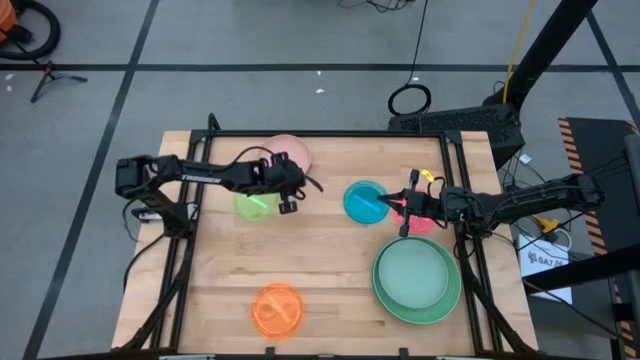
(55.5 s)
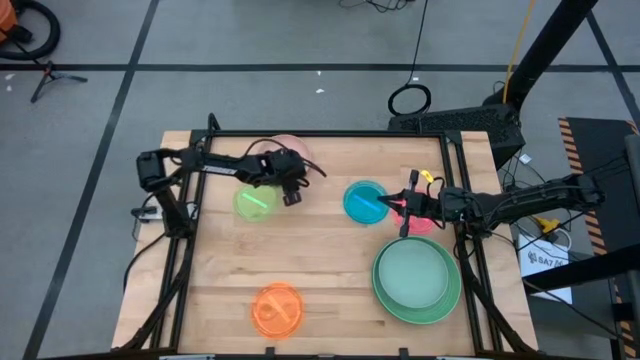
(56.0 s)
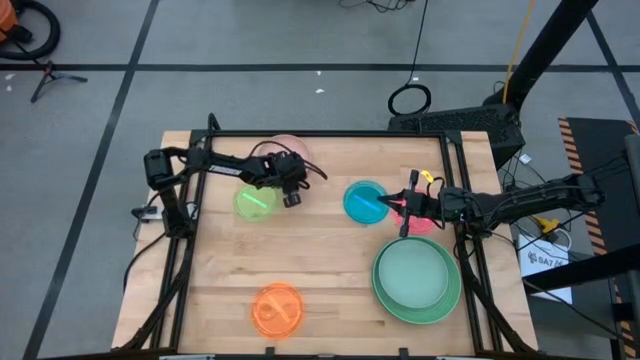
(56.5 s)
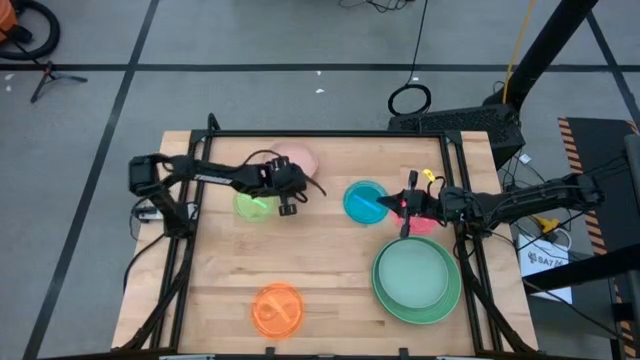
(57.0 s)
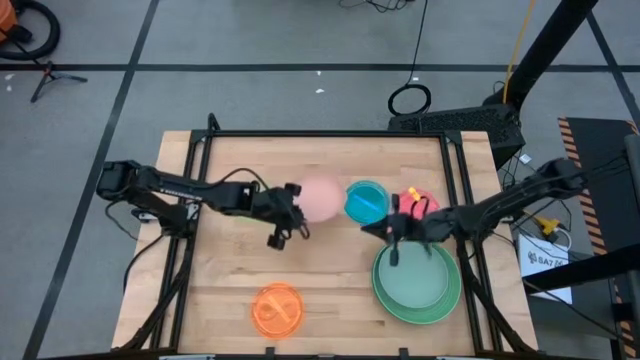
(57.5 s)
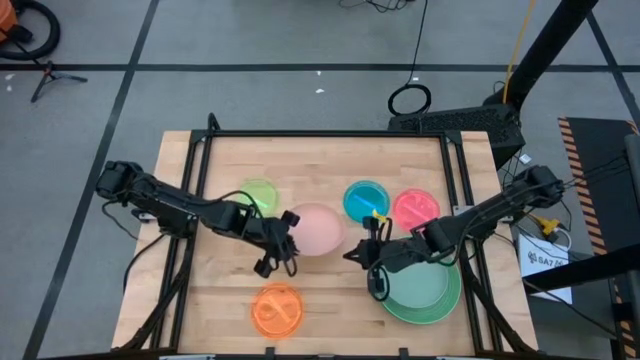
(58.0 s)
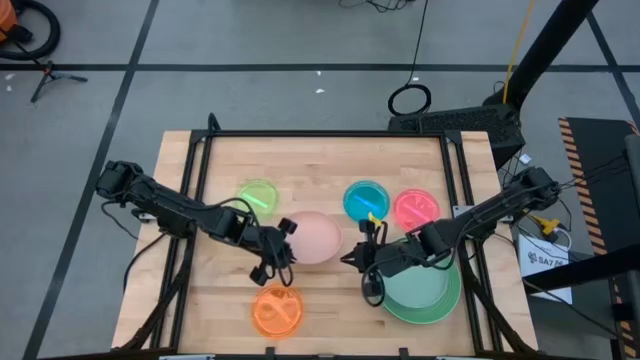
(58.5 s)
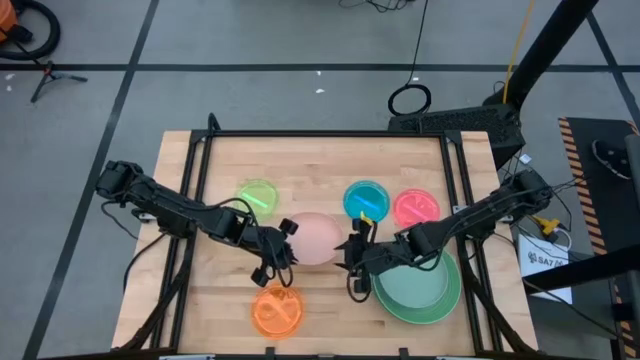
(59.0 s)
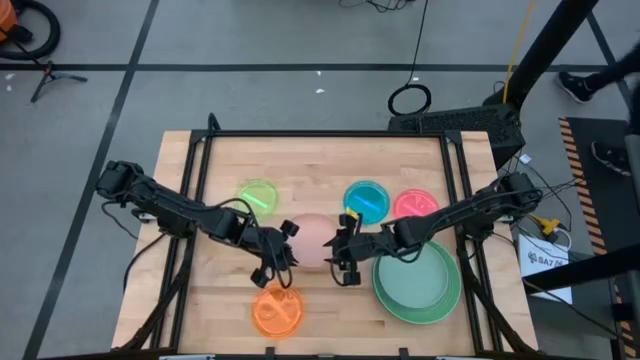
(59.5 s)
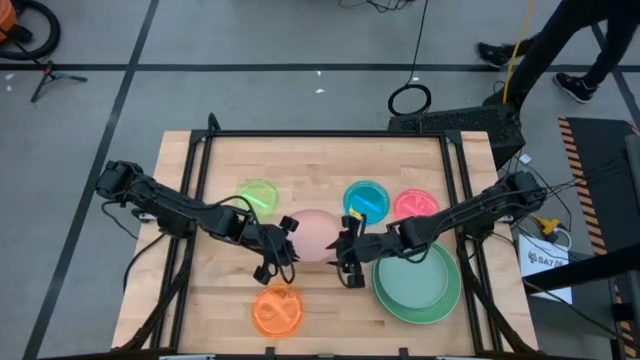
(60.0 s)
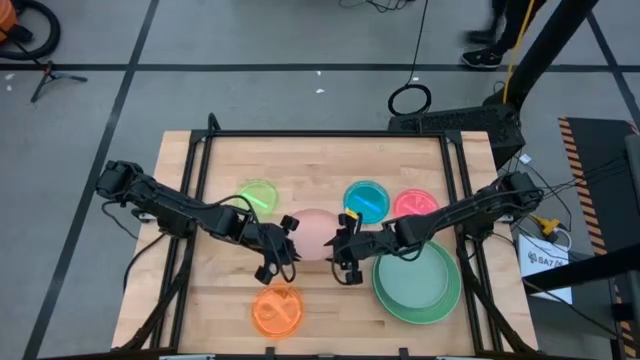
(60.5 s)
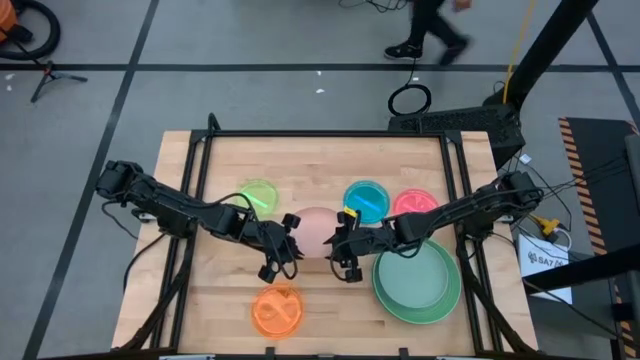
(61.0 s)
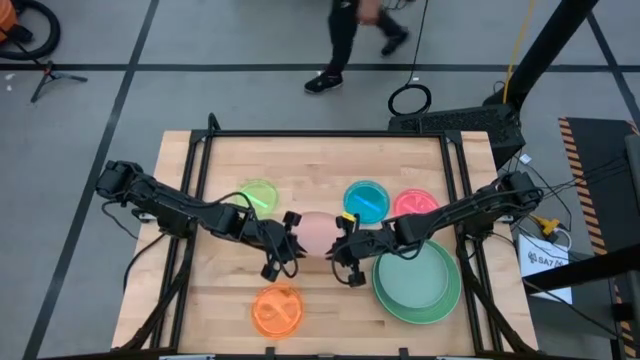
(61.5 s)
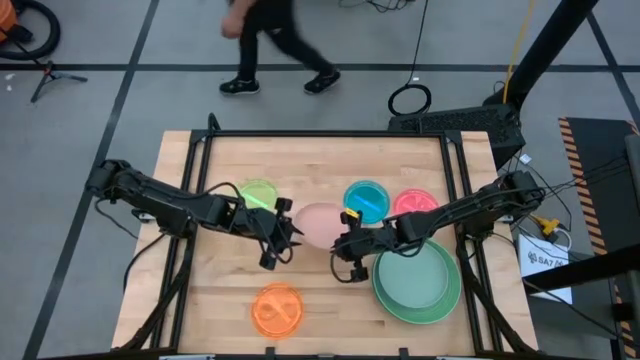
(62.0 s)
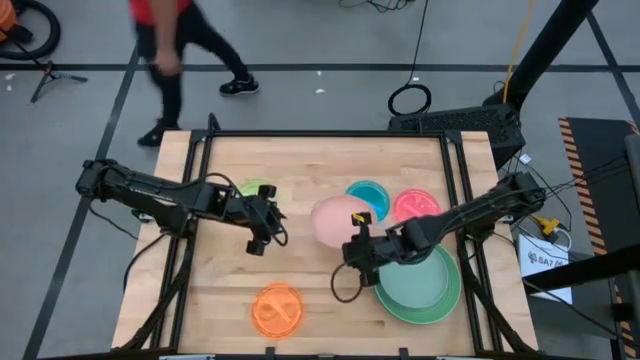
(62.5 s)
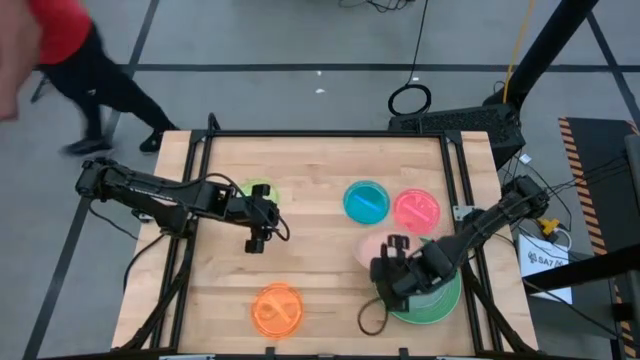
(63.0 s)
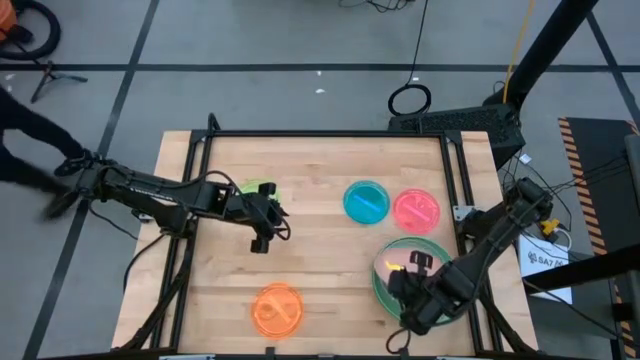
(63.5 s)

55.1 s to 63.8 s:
Task: Stack plastic plates
Stack the light pink plate on top of the light blue plate

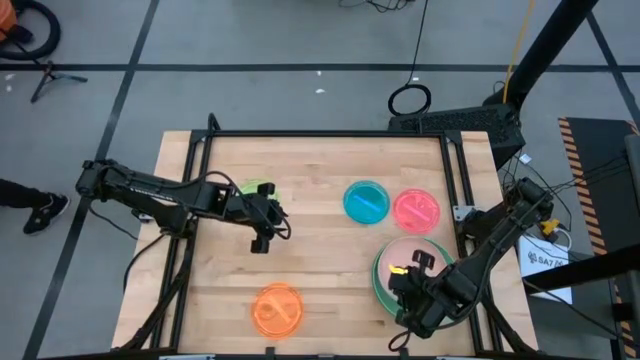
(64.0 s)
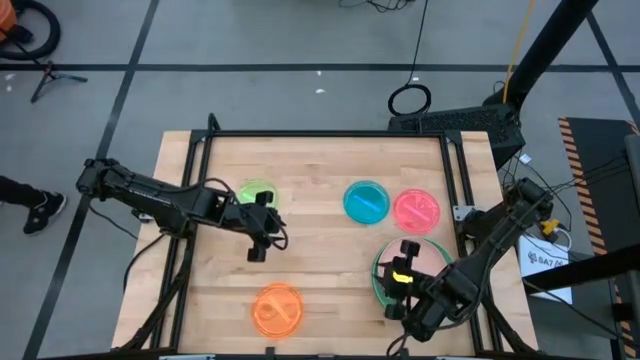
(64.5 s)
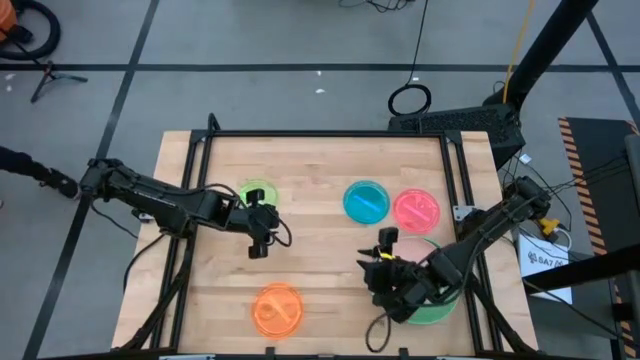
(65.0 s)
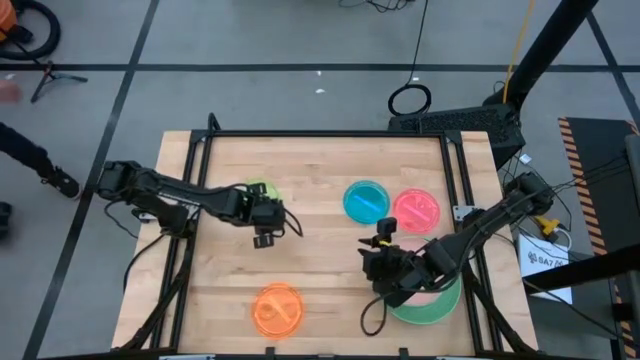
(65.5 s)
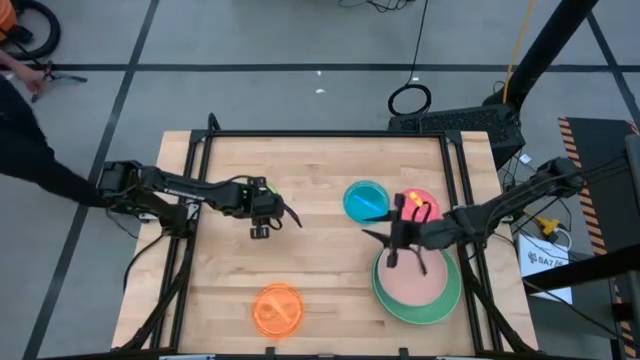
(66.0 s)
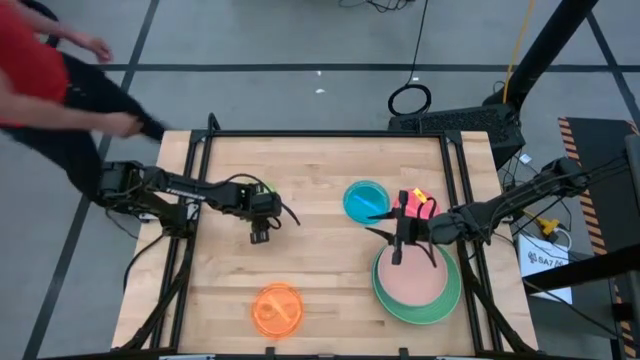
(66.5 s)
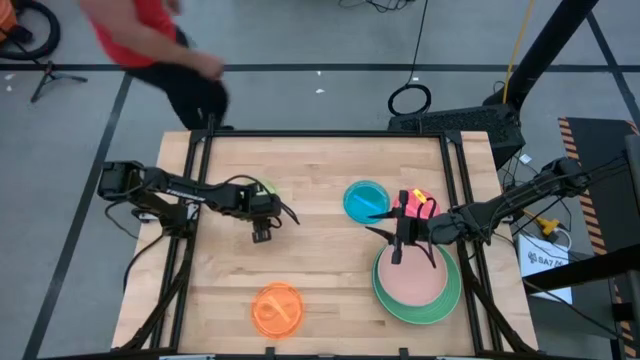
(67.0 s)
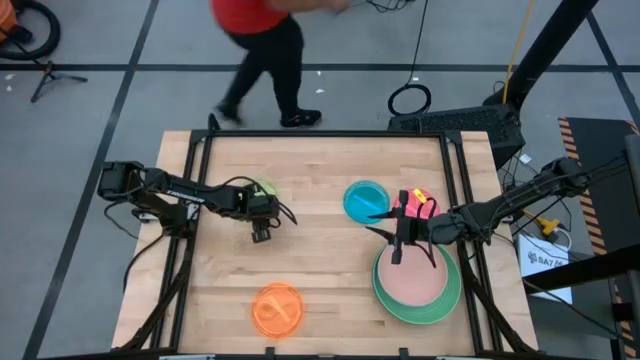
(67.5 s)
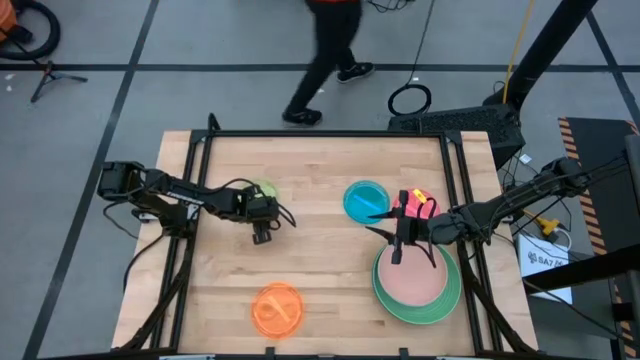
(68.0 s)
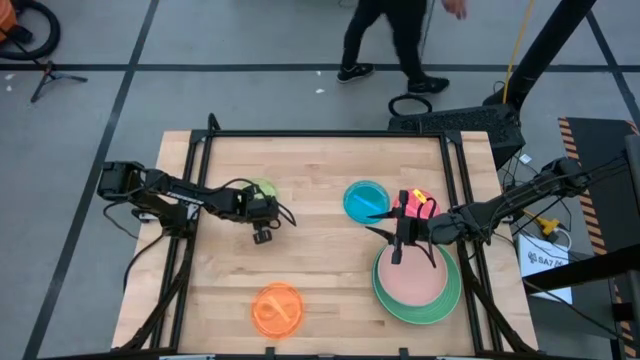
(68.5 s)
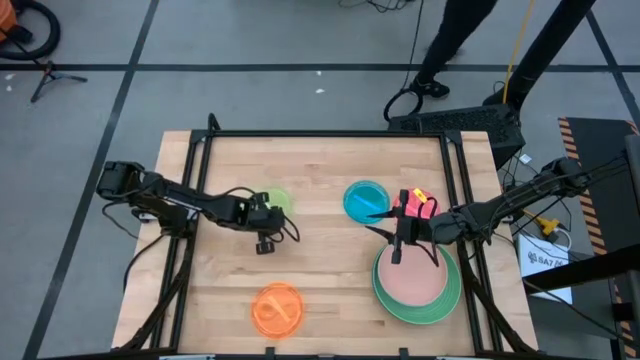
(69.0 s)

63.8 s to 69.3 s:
Stack the green transparent plate on top of the light pink plate

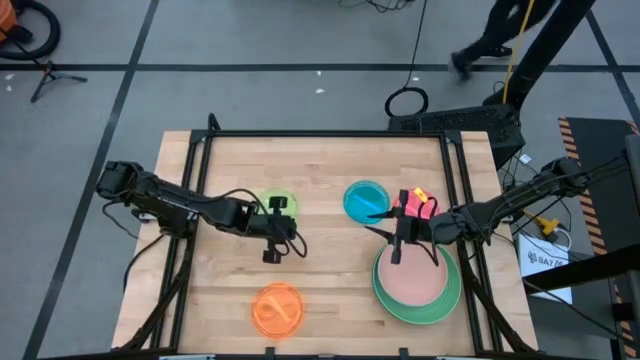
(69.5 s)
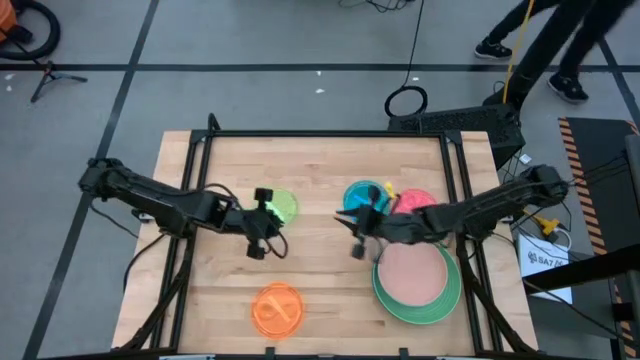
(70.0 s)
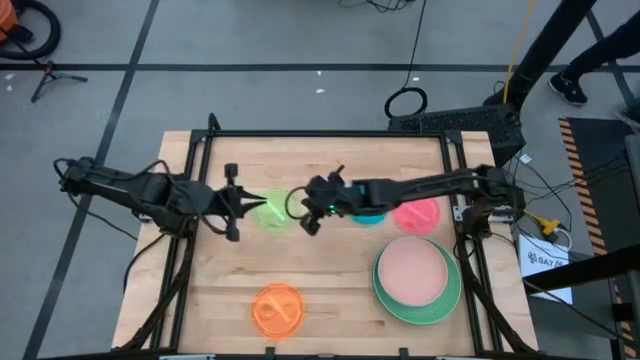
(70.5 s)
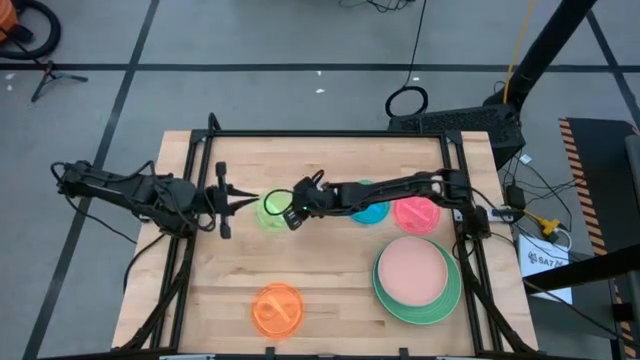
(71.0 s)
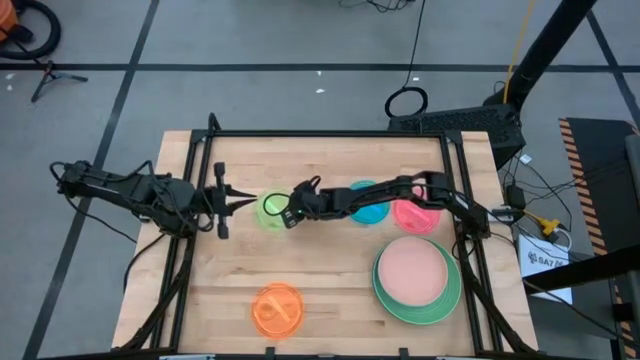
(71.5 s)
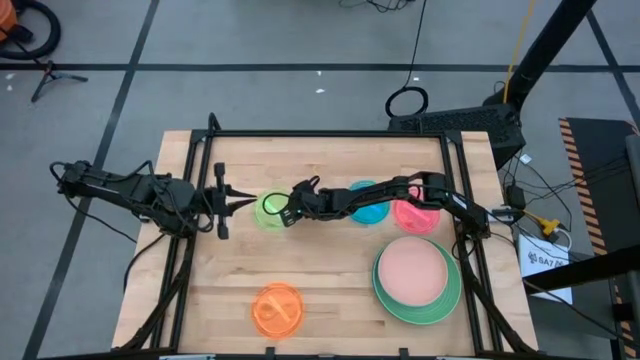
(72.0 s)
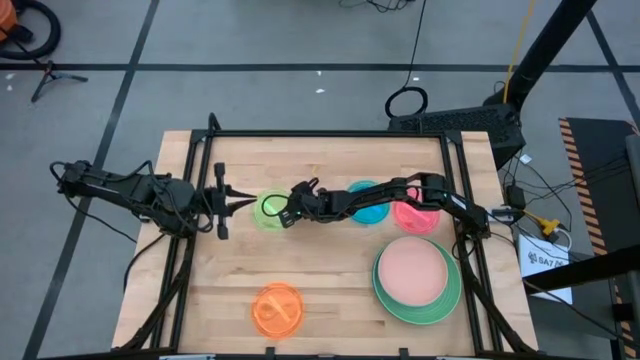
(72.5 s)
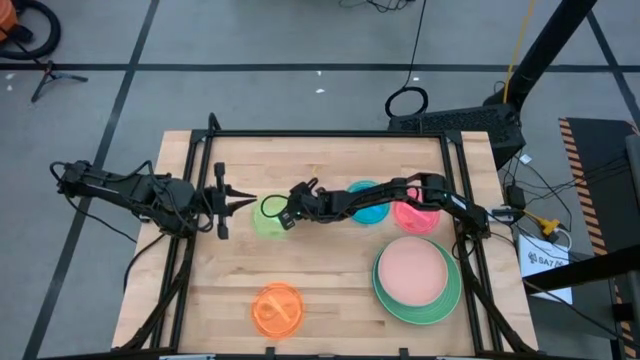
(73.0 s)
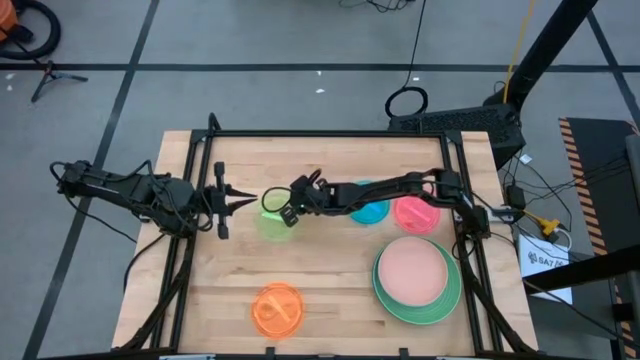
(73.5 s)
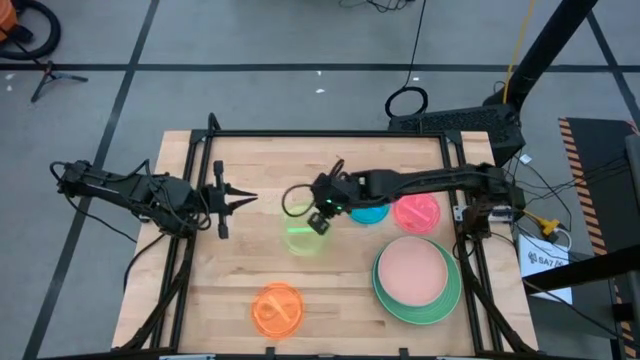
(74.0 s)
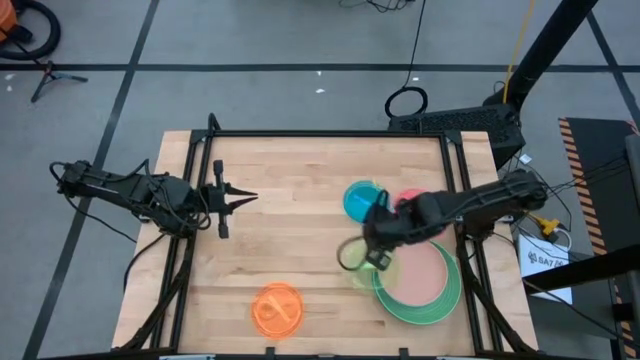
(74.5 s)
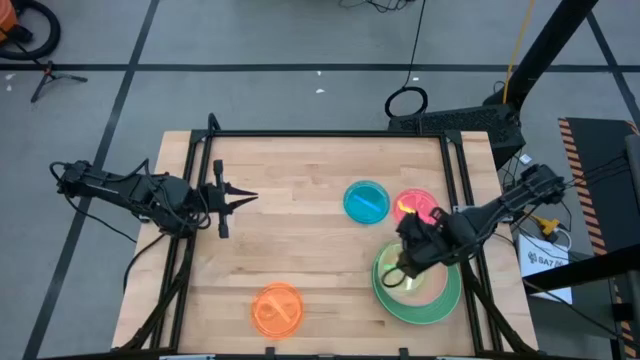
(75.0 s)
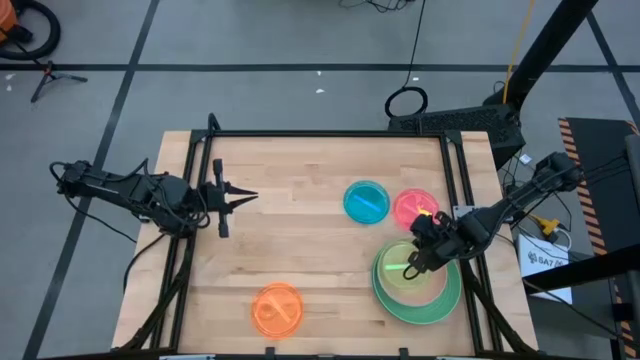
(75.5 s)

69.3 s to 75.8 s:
Stack the green transparent plate on top of the light pink plate
